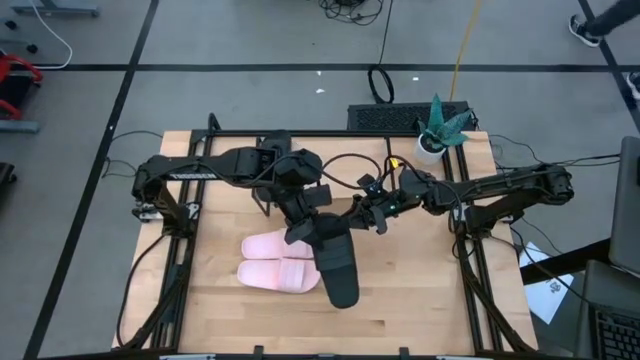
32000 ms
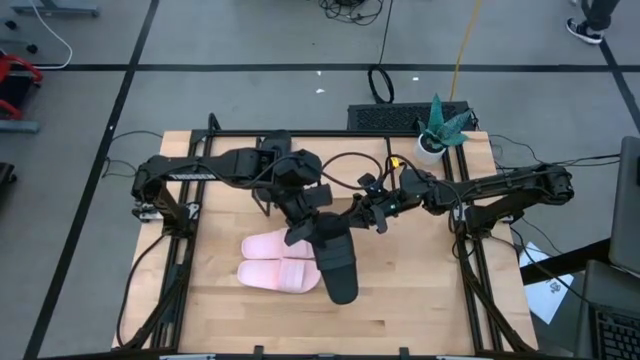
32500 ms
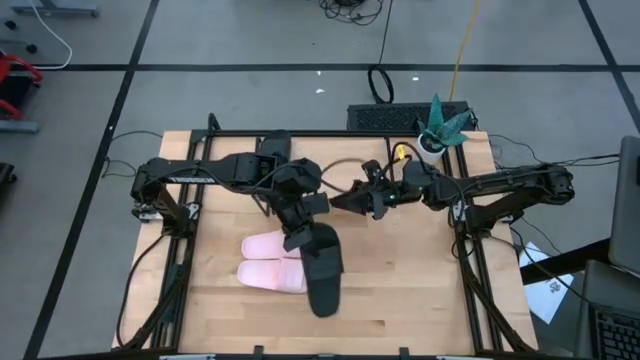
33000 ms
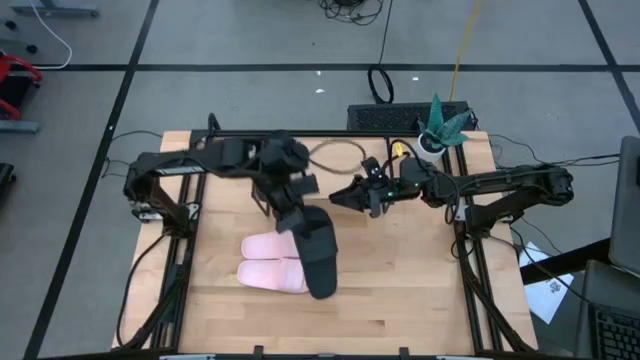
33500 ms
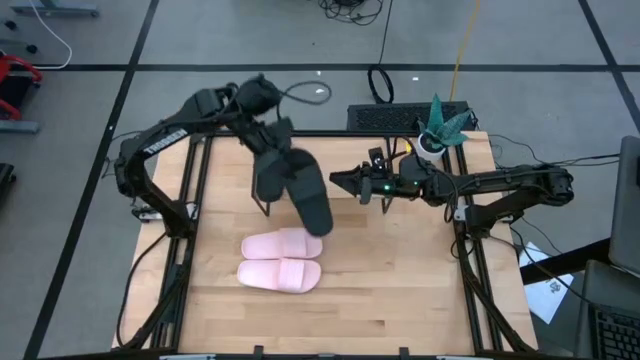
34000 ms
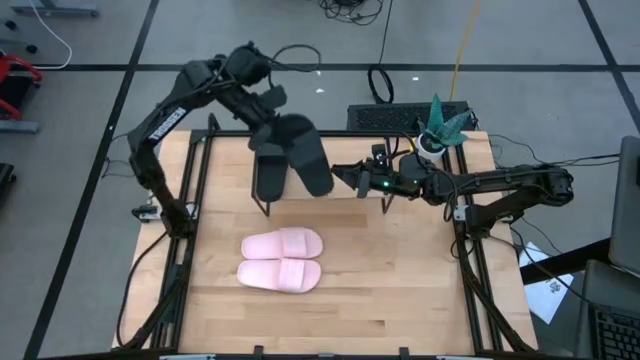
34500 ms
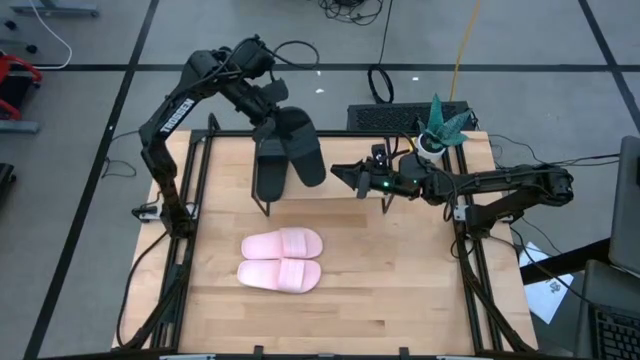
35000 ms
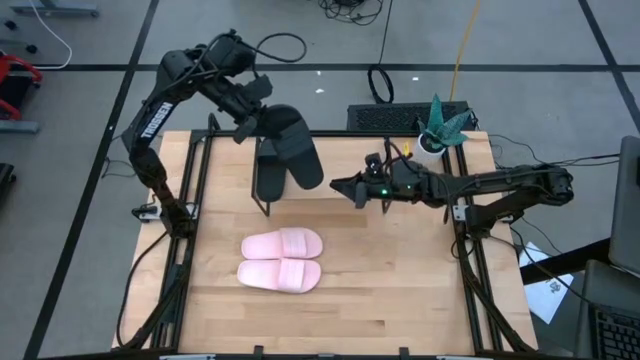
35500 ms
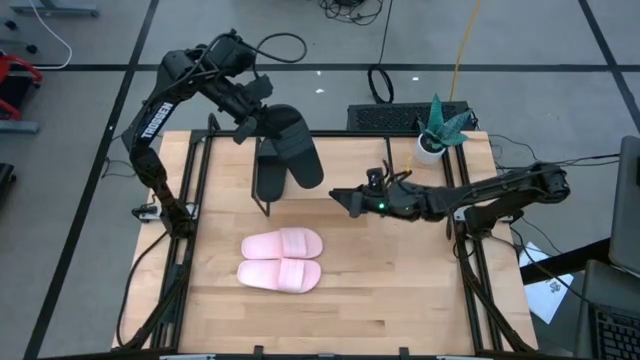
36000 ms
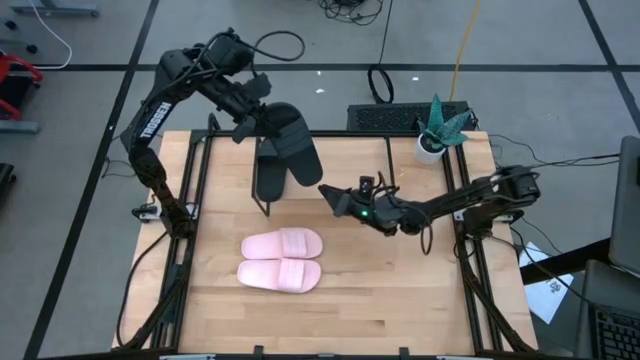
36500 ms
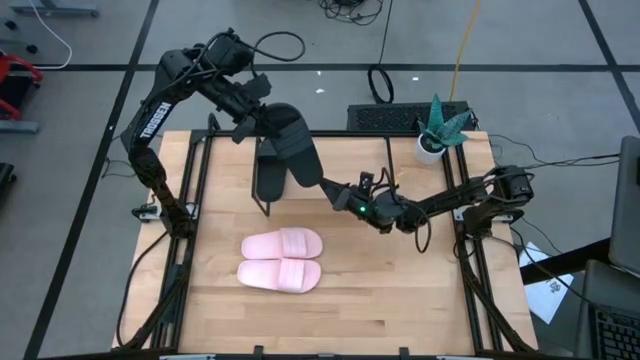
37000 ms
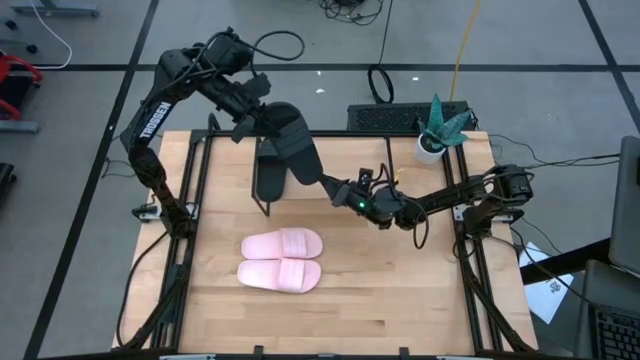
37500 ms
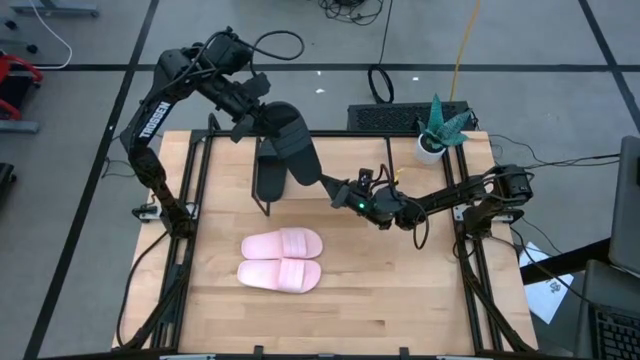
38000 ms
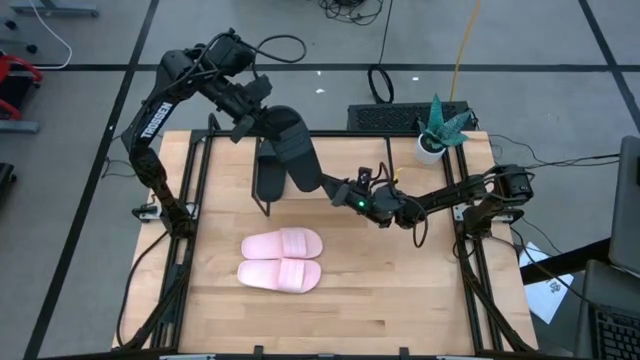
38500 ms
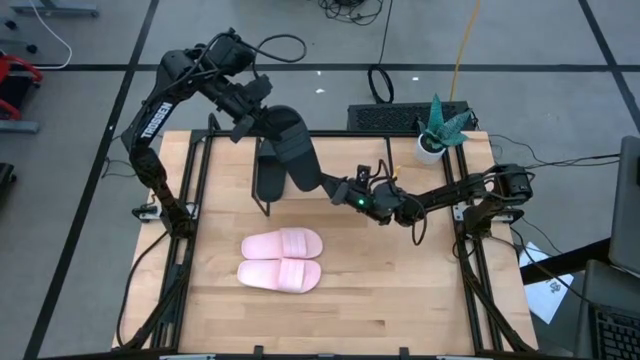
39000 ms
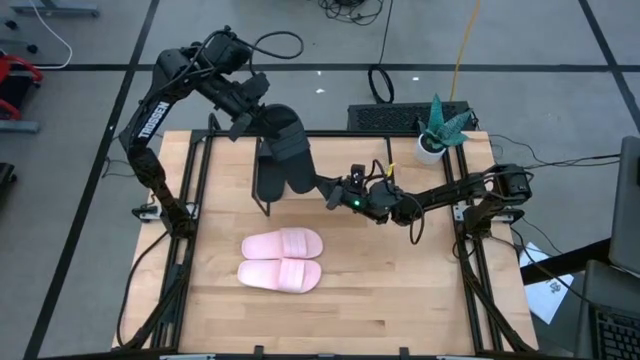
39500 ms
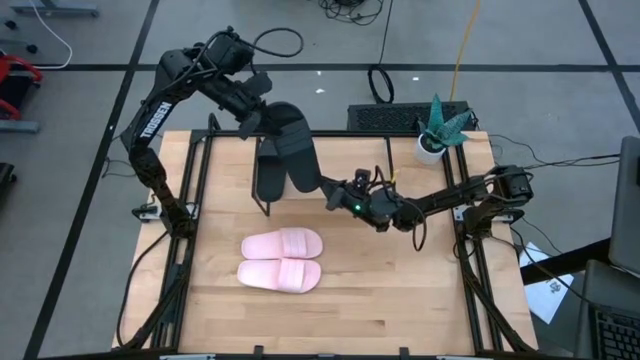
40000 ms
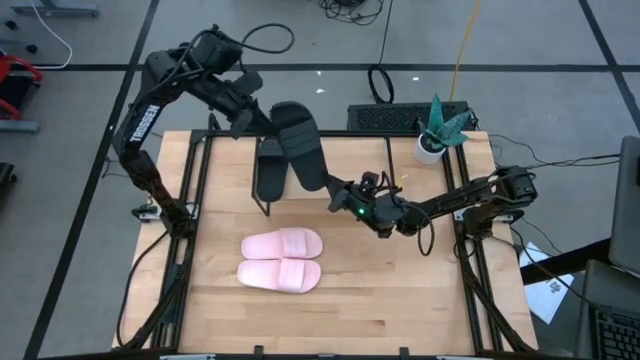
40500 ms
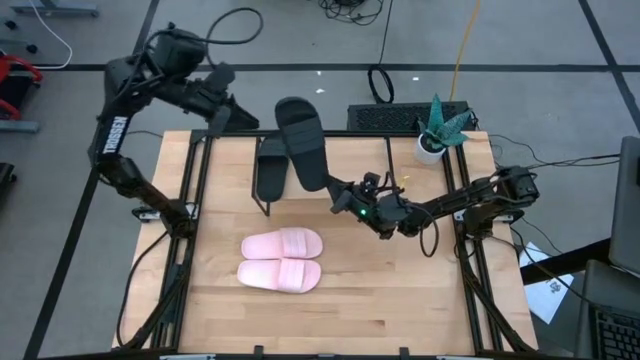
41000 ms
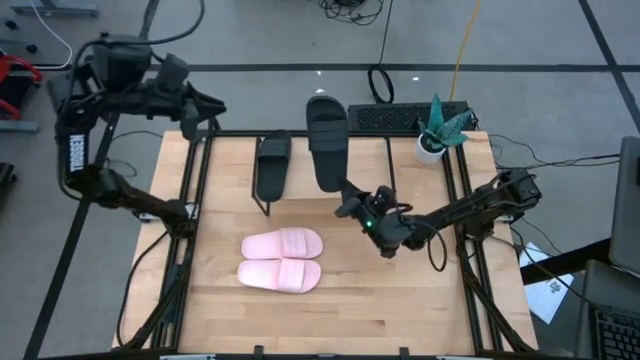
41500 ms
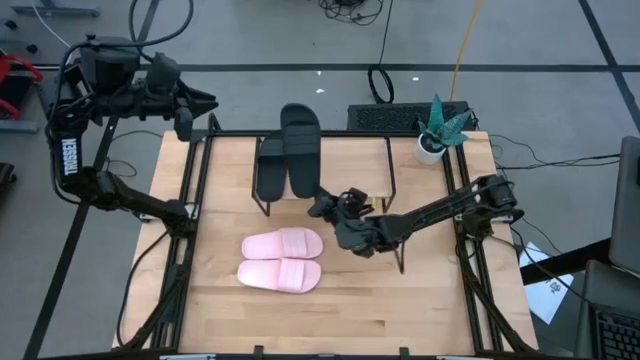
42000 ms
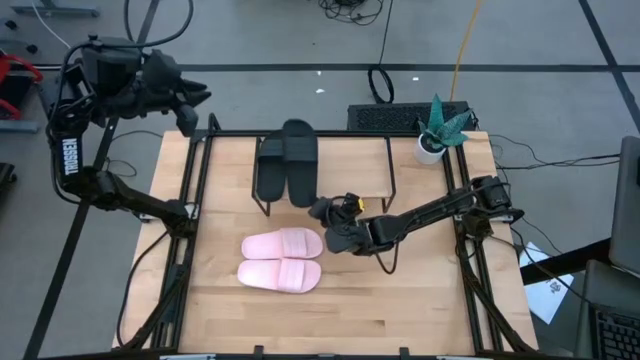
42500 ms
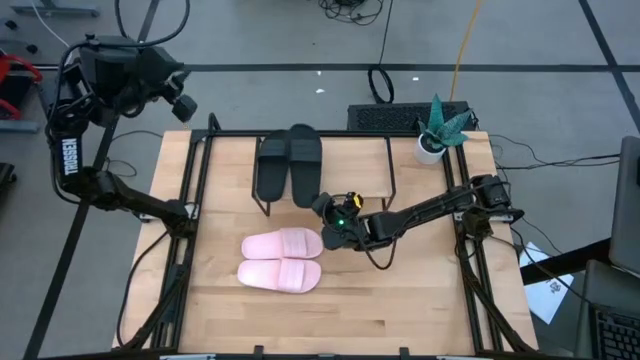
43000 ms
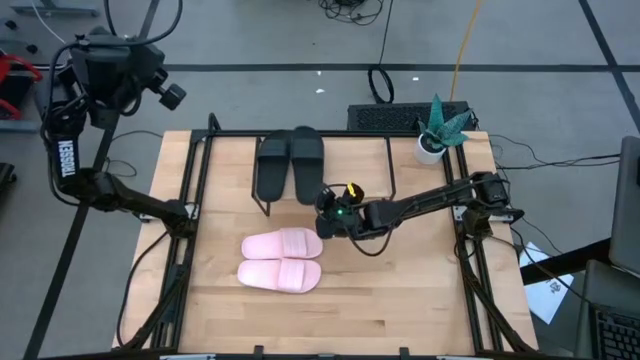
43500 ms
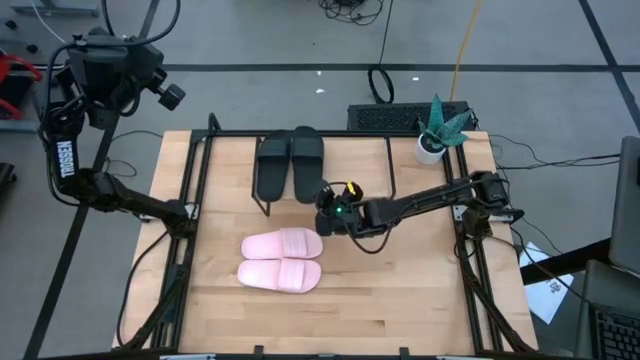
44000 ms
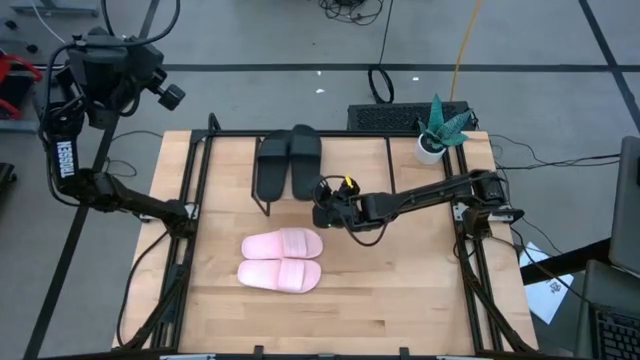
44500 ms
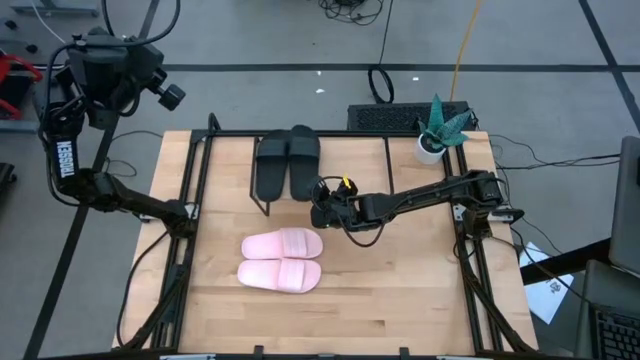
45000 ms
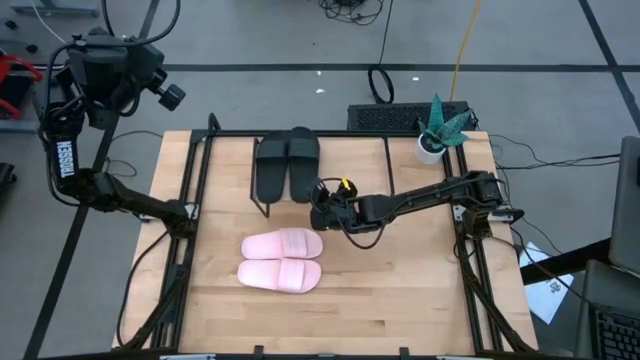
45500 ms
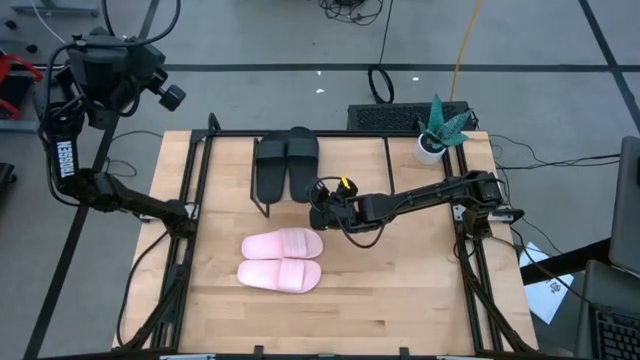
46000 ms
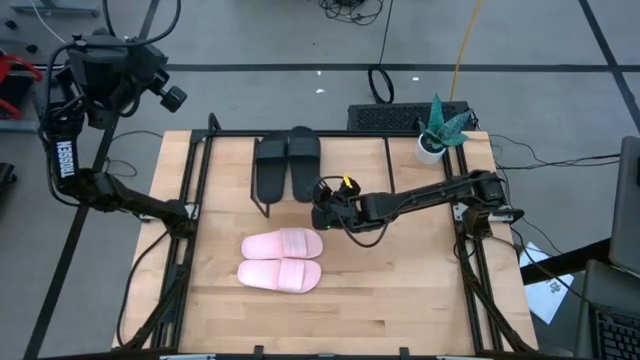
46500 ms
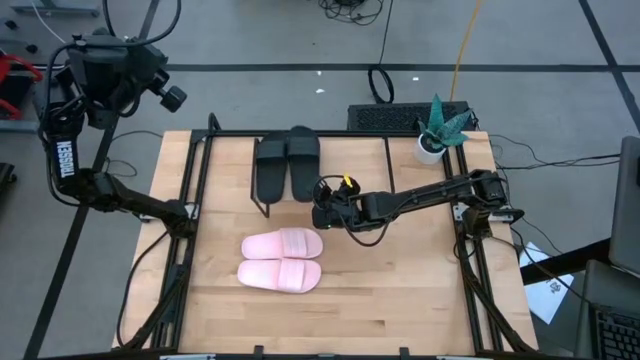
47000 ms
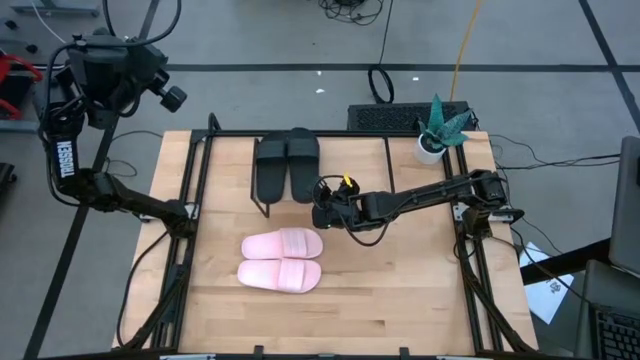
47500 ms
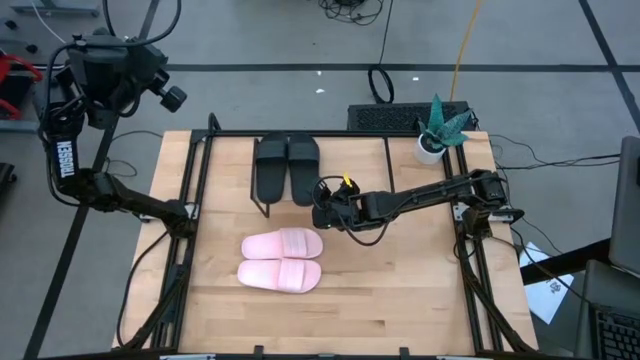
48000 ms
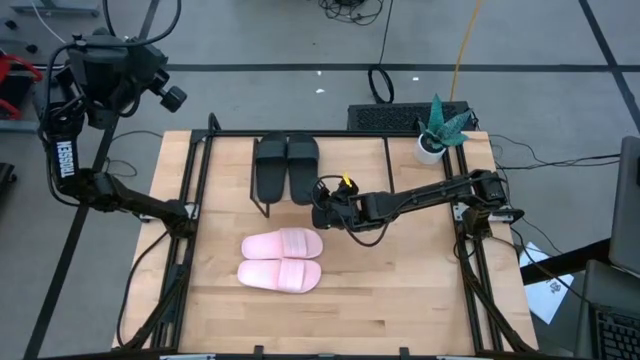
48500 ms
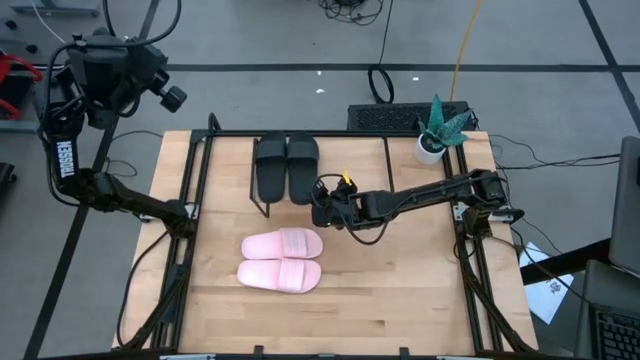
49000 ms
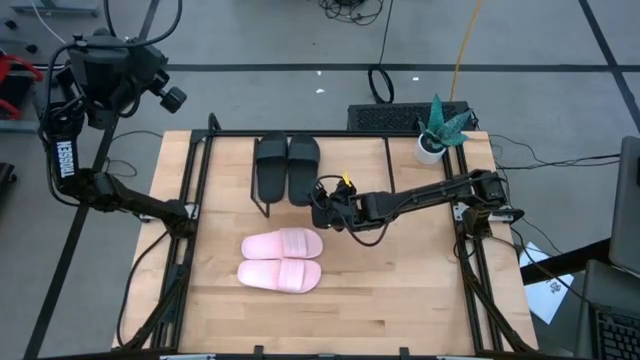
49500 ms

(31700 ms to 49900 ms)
Task: Pick and place slides into the shelf
Put the black slide on the shelf
